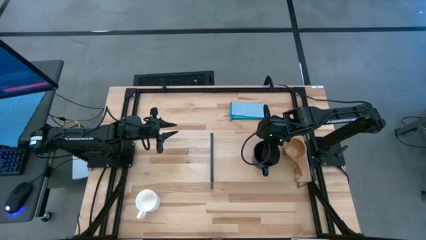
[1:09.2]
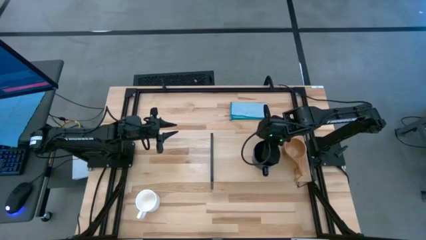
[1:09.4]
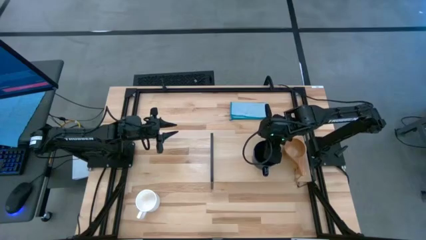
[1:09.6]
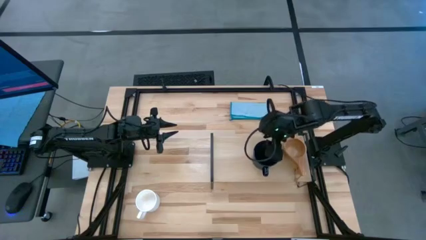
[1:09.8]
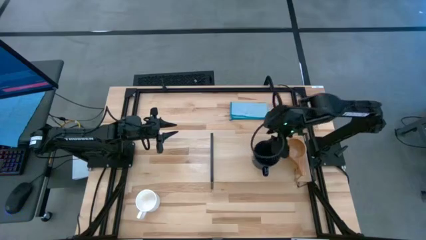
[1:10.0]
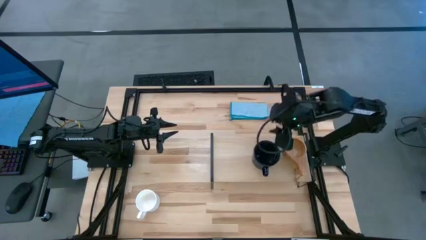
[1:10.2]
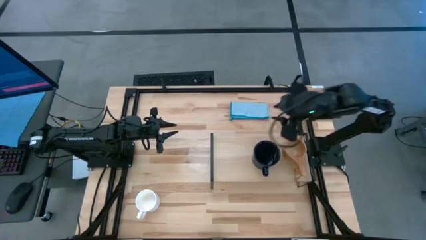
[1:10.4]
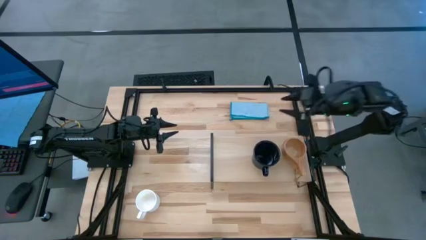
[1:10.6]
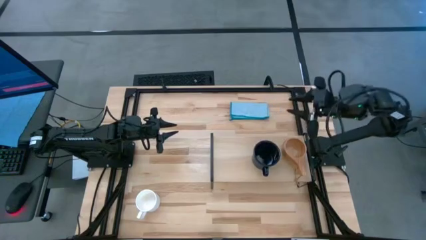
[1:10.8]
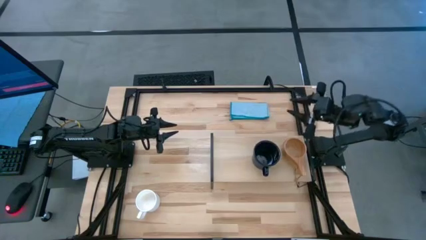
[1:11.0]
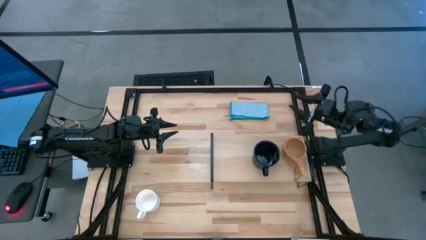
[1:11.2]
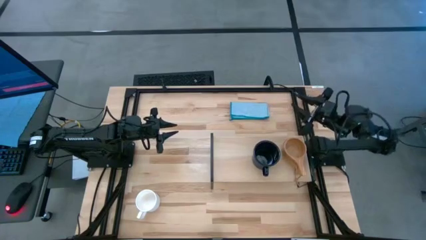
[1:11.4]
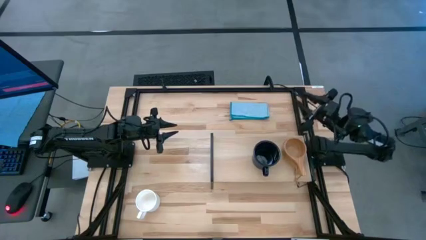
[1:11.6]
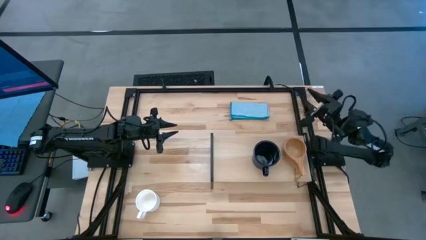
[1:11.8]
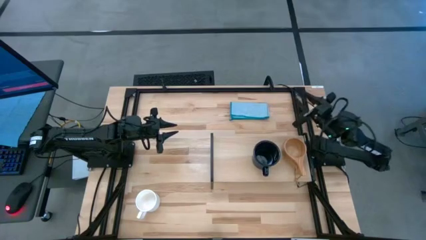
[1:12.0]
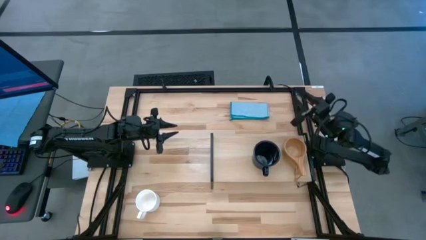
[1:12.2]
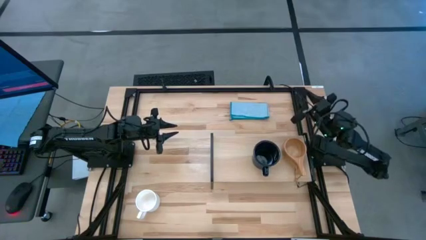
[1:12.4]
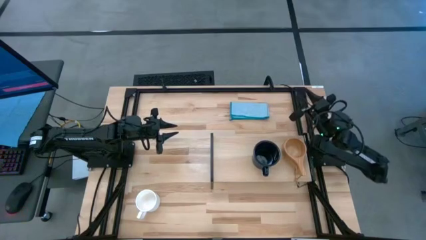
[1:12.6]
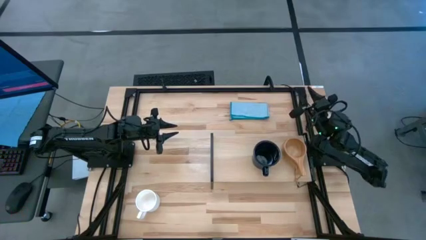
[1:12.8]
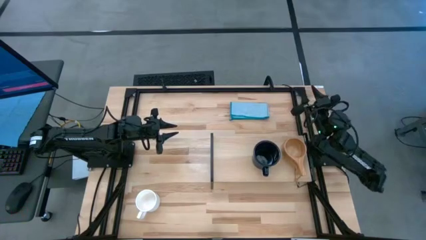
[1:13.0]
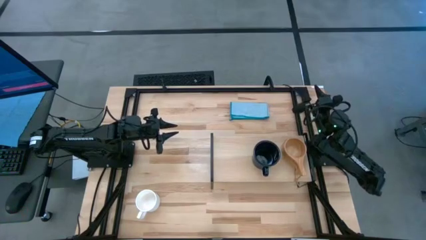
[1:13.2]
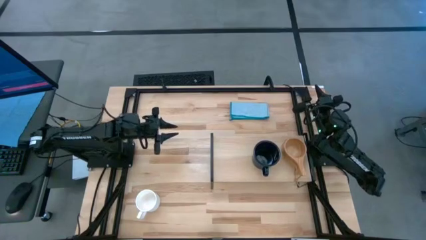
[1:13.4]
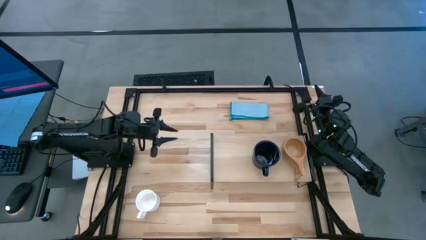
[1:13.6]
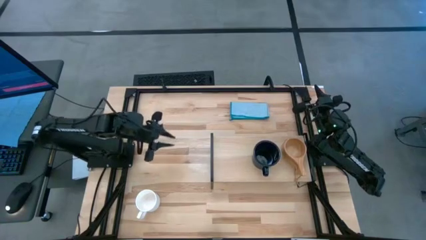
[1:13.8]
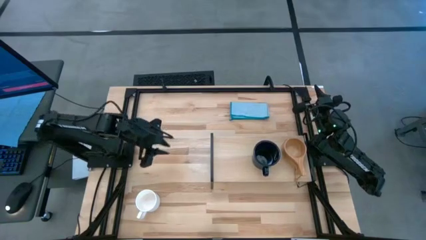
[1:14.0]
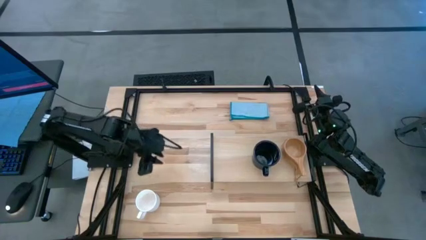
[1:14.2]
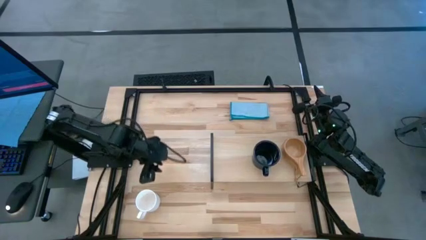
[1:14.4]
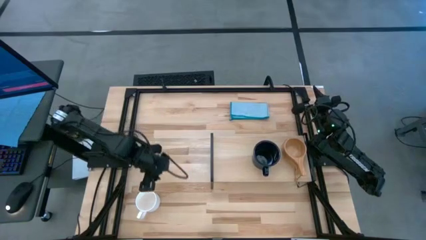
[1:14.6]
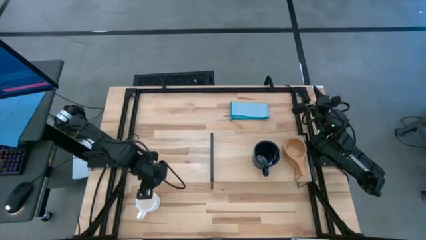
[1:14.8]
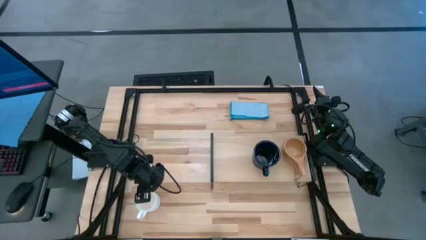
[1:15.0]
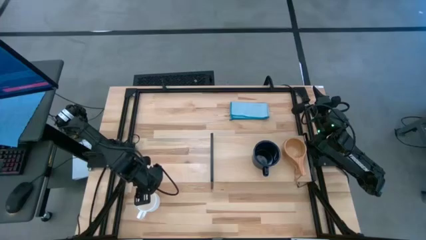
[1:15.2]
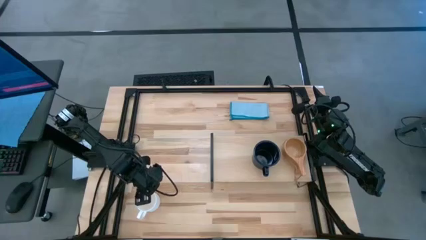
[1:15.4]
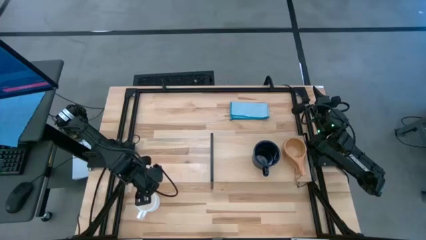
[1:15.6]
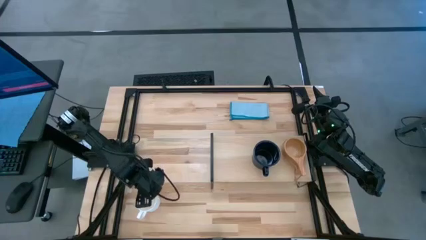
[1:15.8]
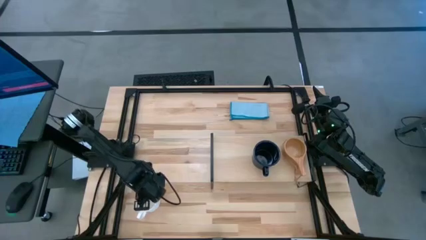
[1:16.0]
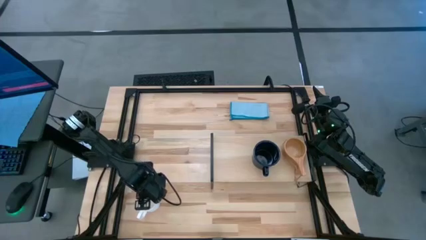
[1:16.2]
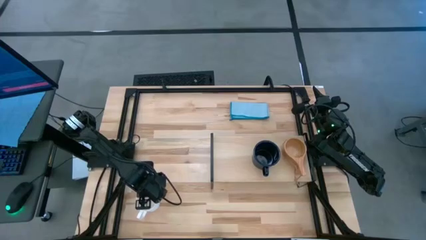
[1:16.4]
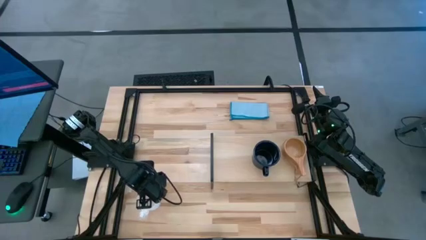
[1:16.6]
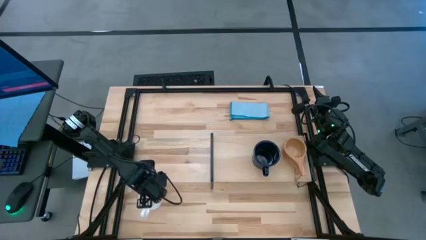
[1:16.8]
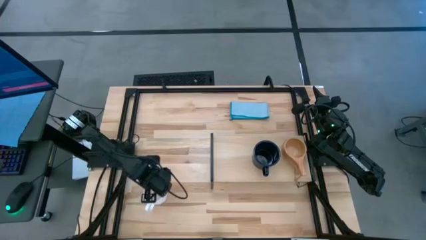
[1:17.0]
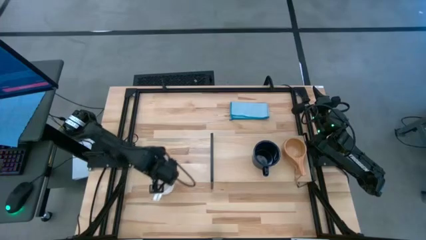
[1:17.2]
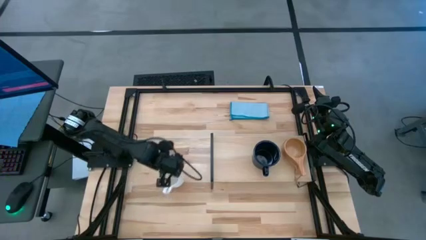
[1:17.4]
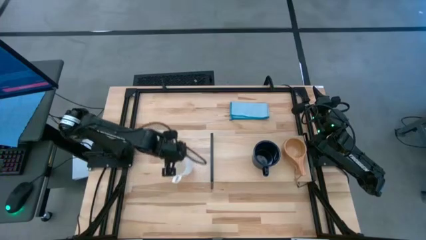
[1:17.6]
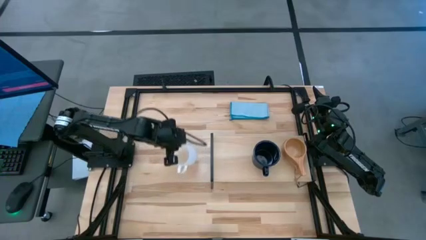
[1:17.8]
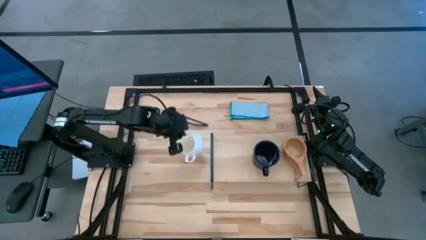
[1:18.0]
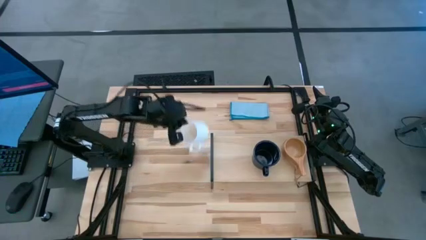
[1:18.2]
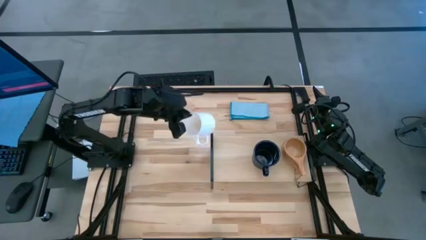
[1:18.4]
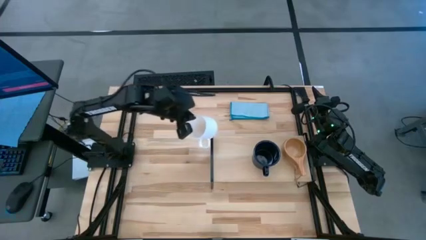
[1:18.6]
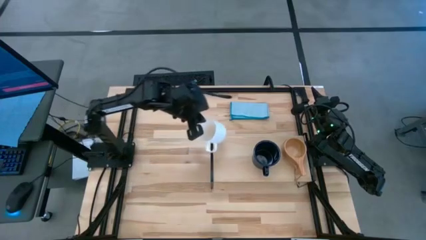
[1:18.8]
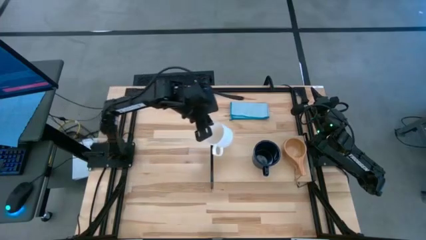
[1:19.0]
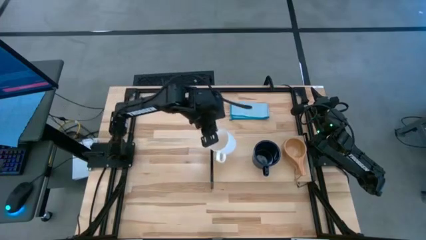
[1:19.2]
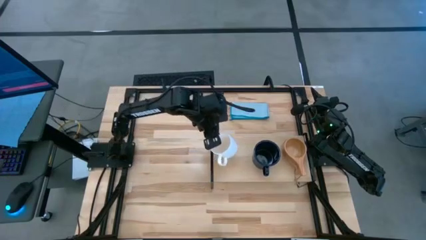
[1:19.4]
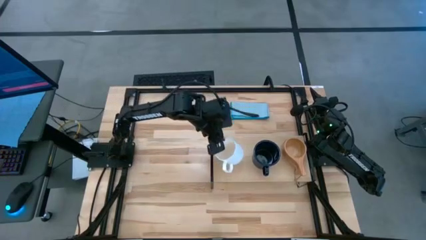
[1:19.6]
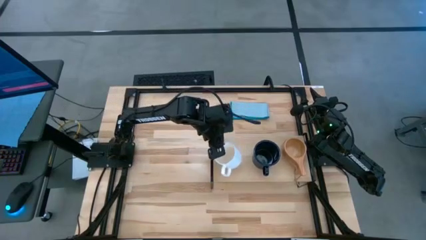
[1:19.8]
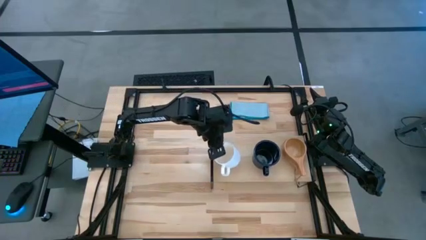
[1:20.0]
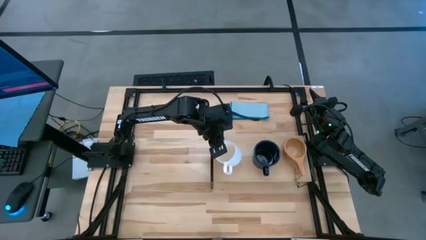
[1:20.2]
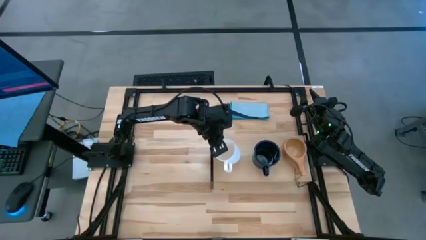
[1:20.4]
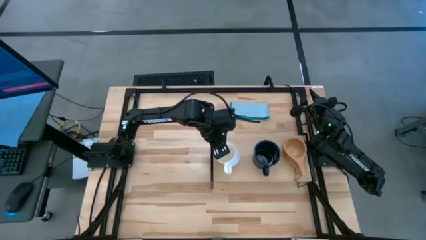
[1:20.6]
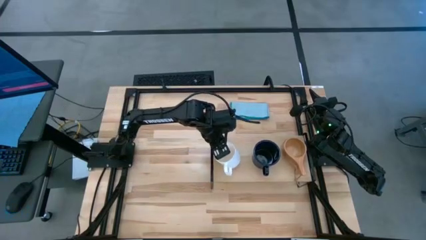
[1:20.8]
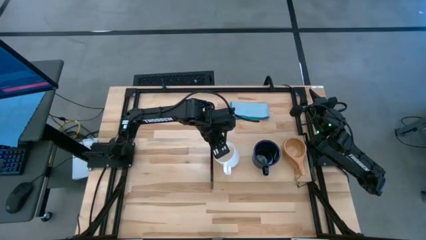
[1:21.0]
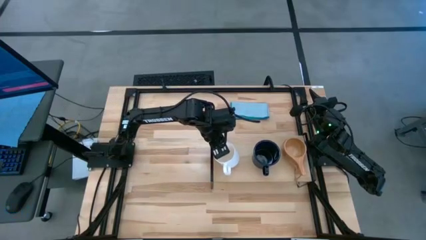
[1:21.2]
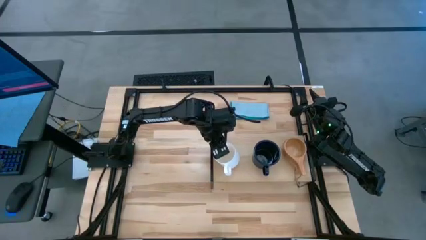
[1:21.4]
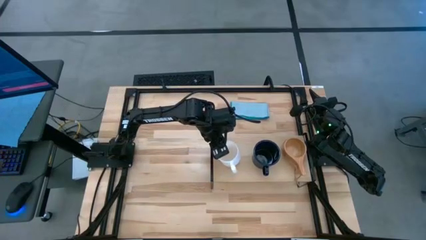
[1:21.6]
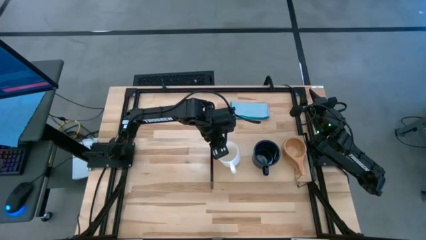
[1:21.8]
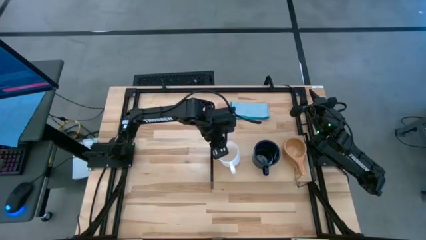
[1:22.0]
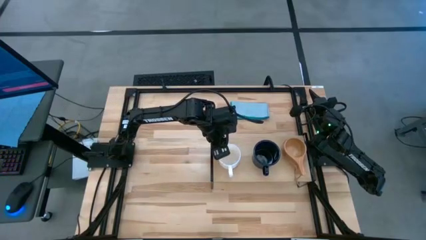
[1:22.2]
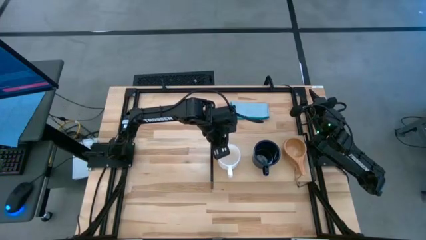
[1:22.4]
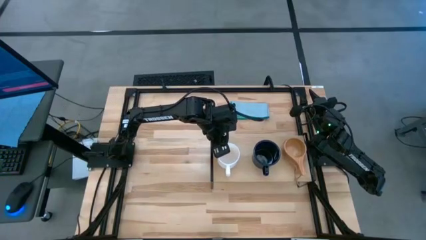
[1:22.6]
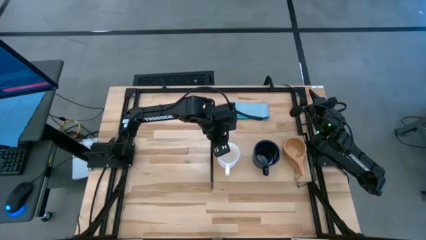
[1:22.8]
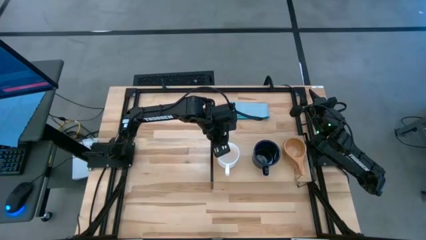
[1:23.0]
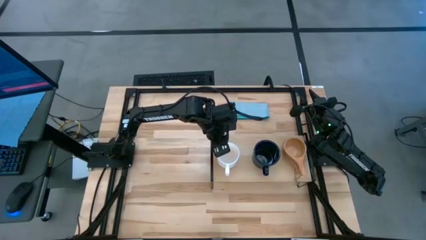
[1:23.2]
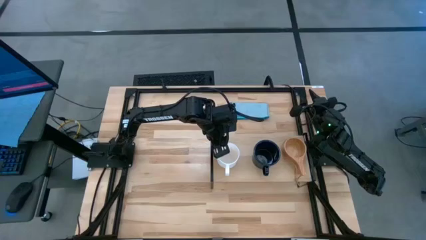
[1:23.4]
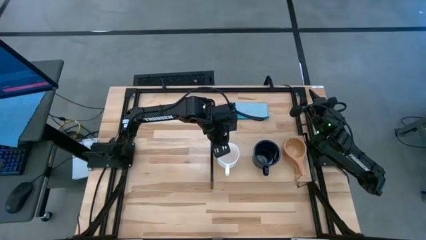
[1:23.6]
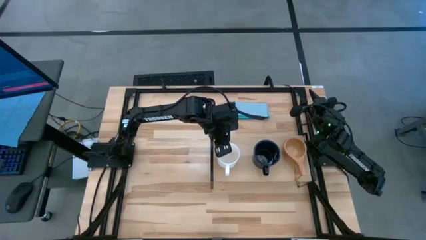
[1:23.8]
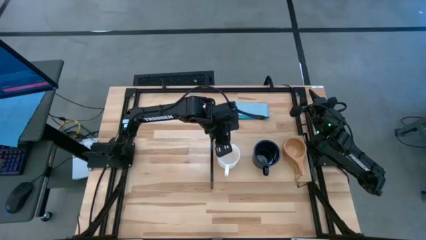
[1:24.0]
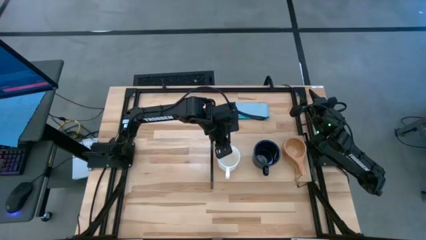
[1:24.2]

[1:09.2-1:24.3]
Task: Stack small to large cups/mugs on shelf
Put the white mug on the shelf
